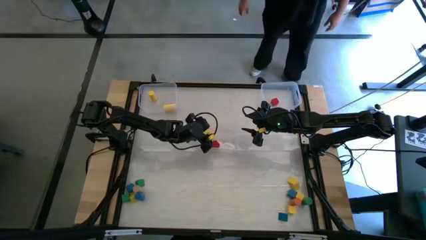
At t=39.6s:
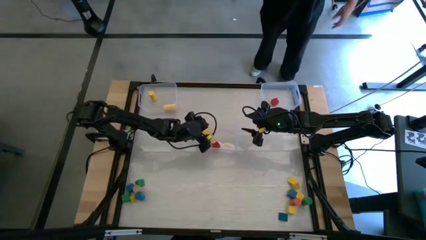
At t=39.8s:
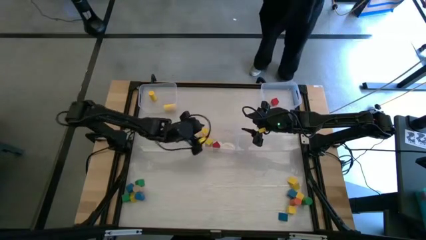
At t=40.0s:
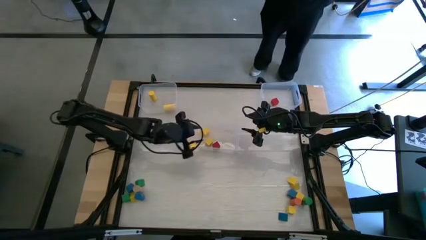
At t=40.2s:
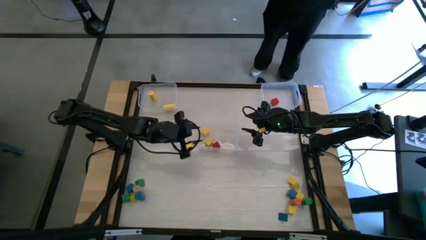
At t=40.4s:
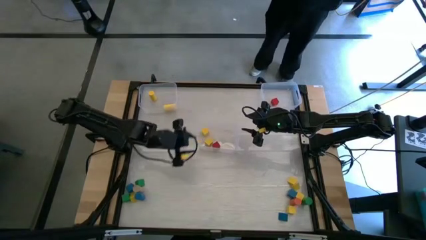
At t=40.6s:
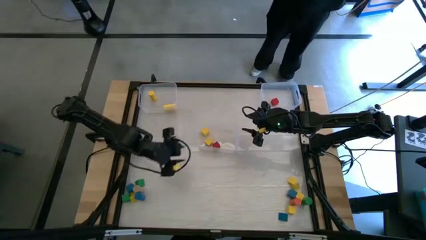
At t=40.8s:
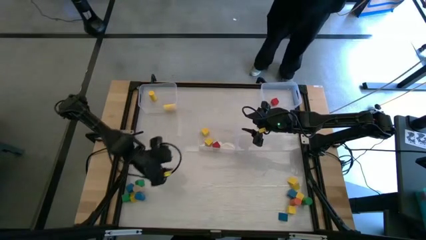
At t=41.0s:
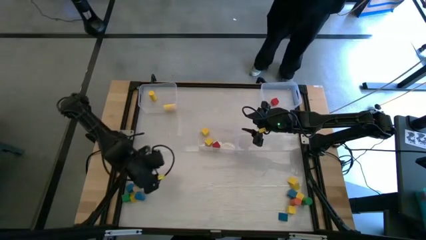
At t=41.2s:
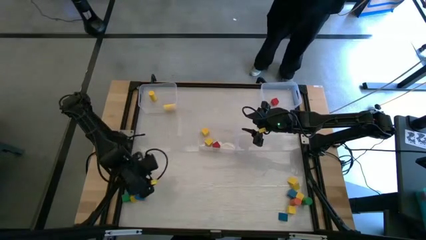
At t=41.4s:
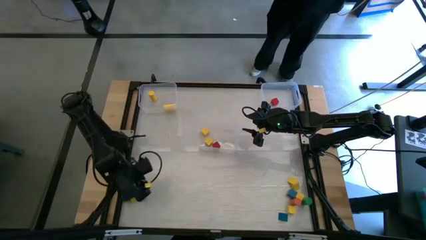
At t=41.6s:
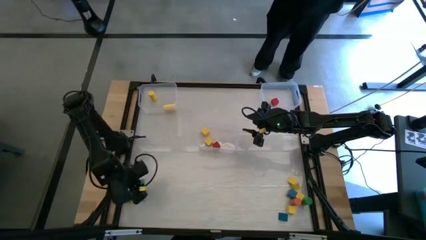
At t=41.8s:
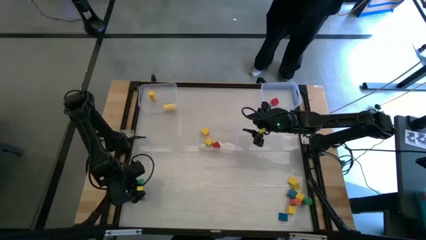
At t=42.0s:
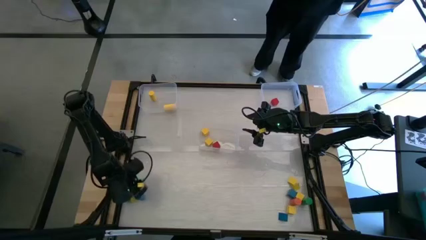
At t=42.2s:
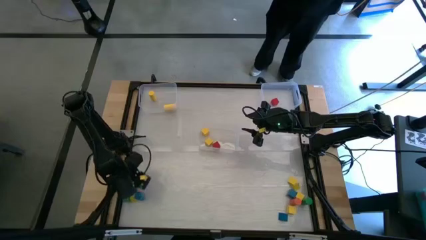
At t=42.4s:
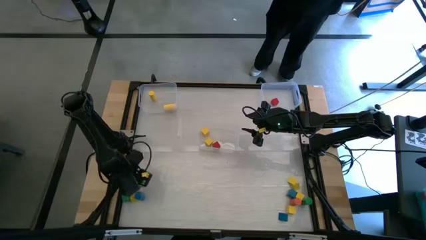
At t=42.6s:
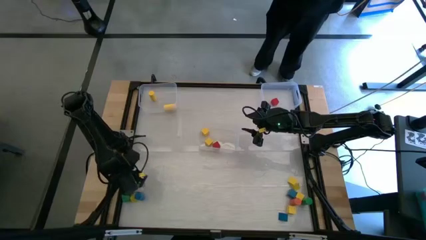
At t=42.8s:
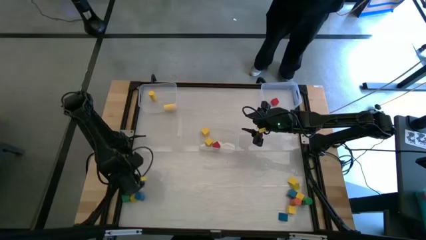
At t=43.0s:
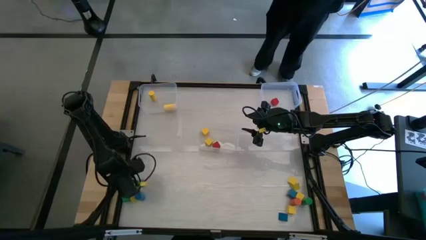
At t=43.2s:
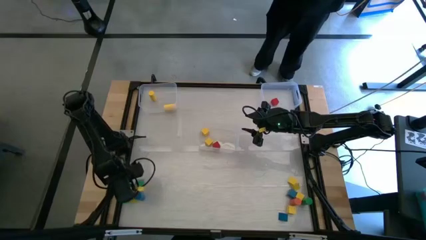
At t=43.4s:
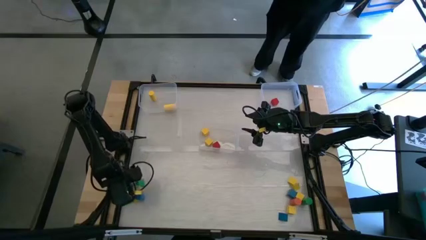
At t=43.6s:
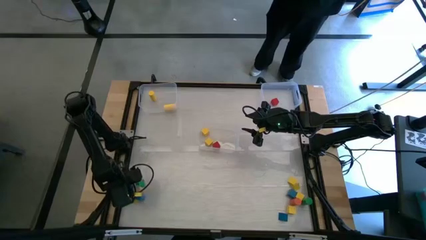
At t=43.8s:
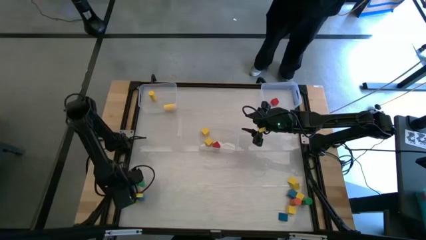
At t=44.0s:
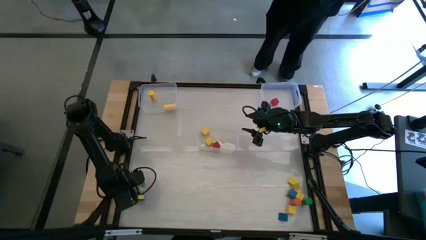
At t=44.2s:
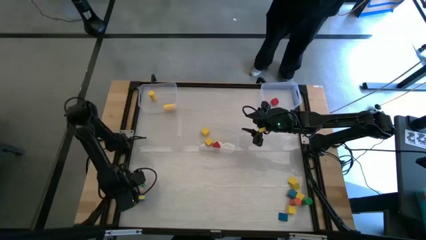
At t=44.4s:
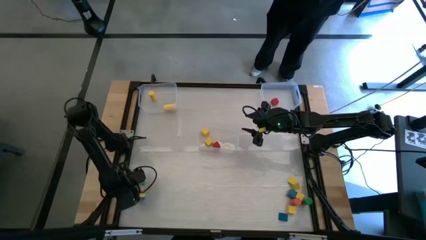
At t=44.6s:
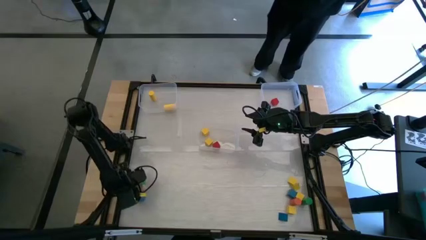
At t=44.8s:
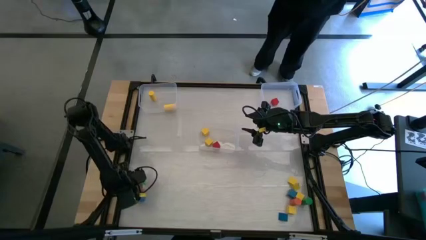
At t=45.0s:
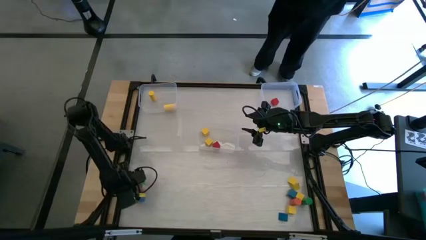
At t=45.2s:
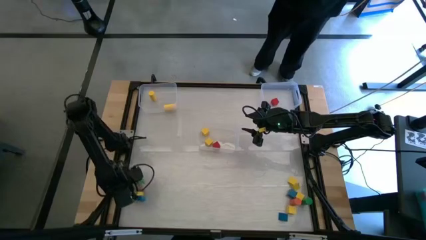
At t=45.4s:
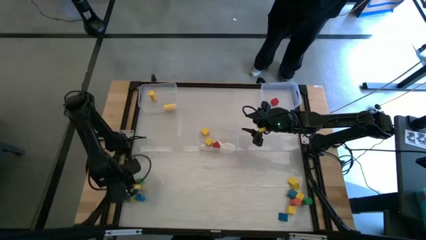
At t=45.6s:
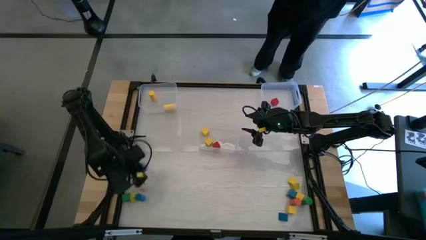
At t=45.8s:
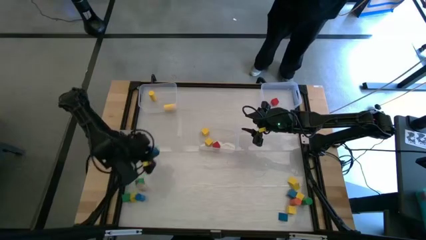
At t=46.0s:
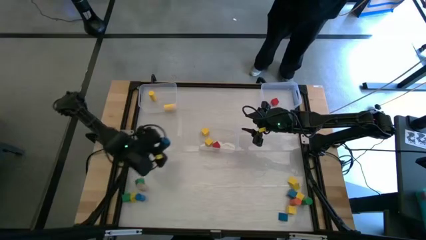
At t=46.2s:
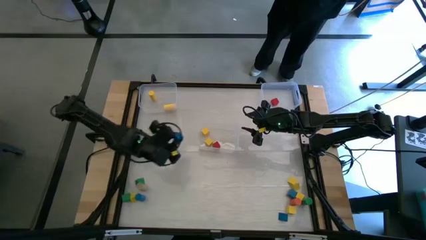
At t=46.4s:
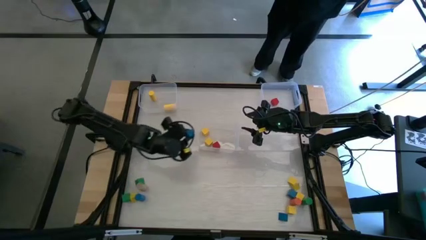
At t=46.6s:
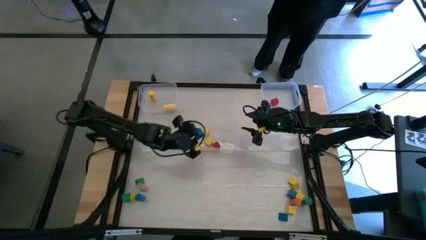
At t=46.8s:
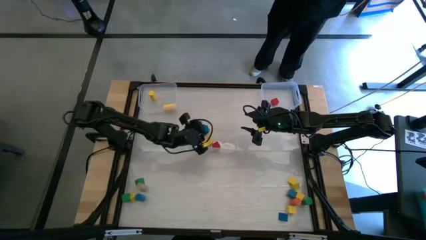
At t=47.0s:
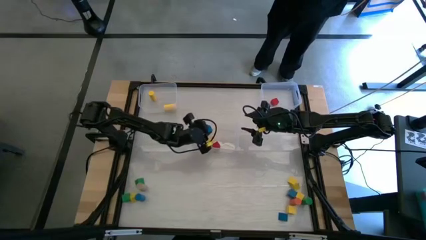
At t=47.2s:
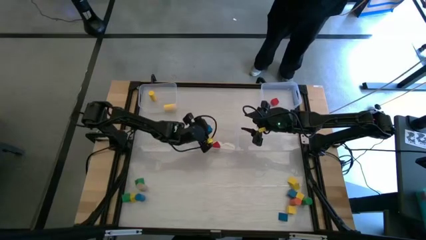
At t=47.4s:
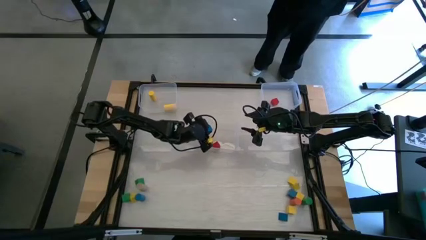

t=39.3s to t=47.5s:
Task: Sort blocks by size
Put the blue square block into the bottom transparent bin

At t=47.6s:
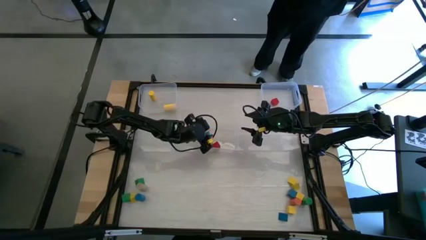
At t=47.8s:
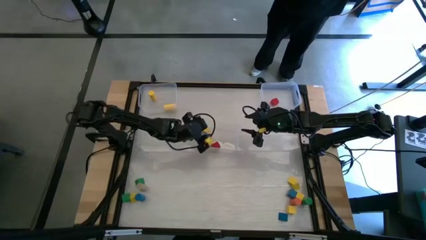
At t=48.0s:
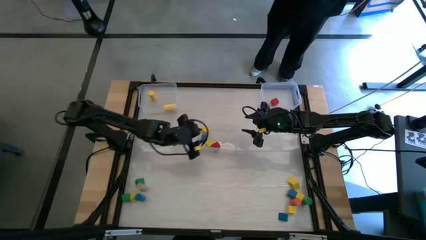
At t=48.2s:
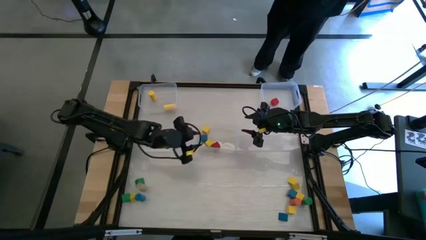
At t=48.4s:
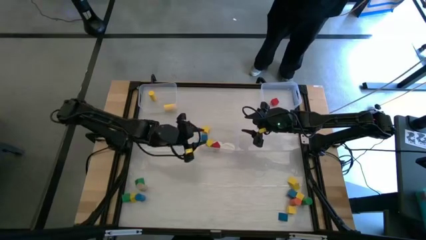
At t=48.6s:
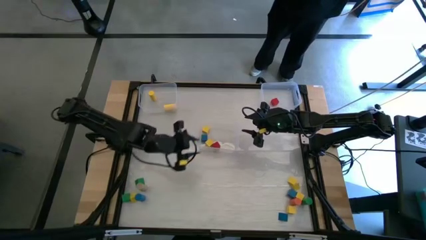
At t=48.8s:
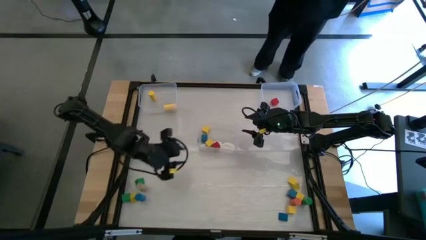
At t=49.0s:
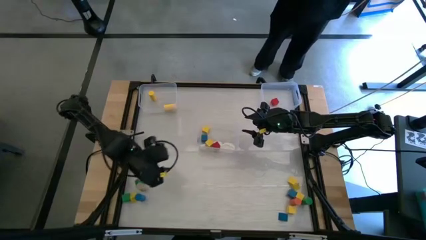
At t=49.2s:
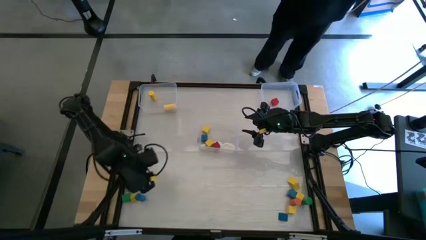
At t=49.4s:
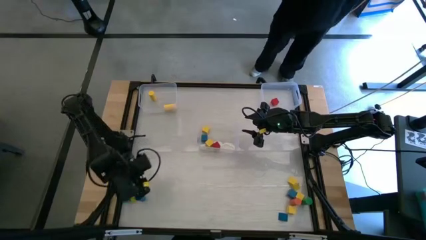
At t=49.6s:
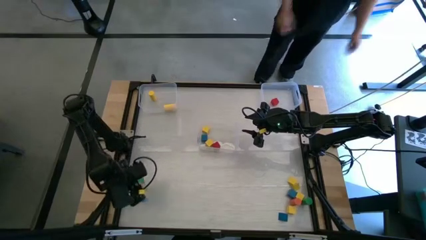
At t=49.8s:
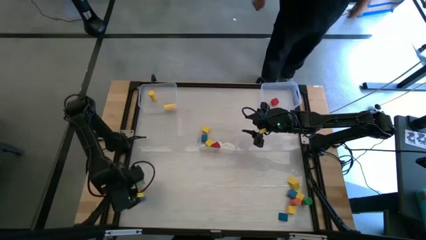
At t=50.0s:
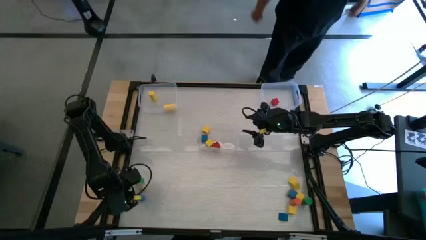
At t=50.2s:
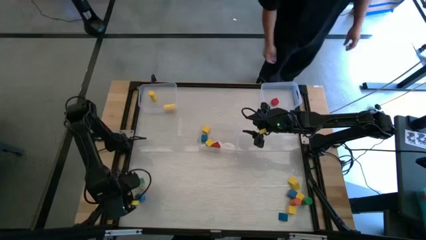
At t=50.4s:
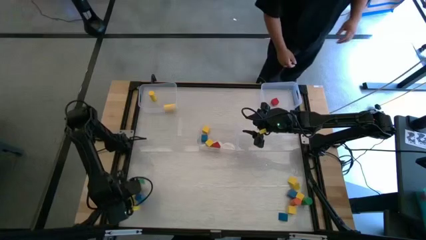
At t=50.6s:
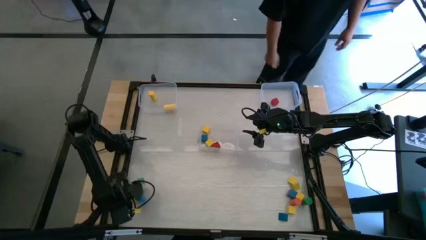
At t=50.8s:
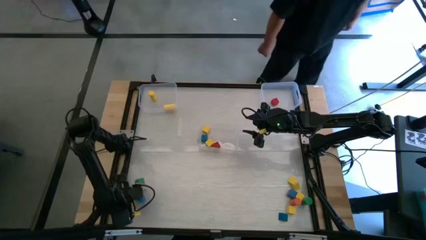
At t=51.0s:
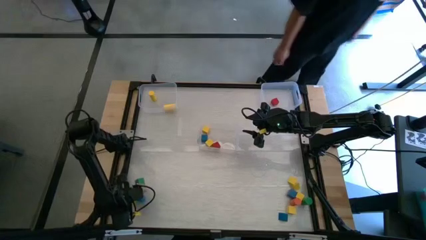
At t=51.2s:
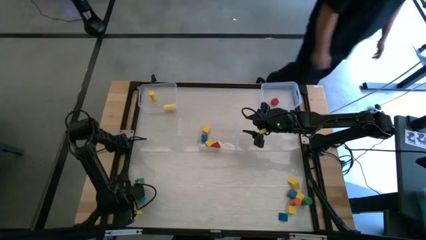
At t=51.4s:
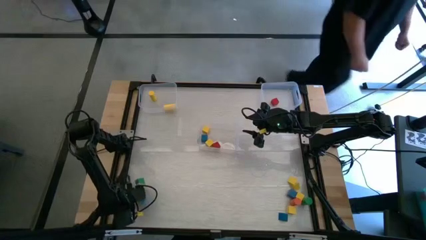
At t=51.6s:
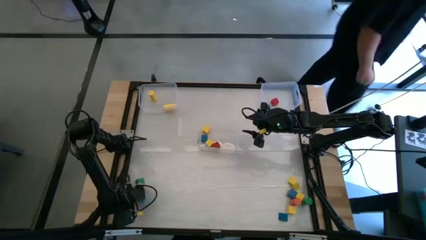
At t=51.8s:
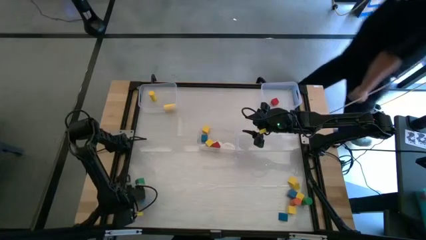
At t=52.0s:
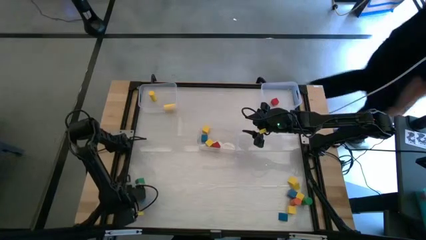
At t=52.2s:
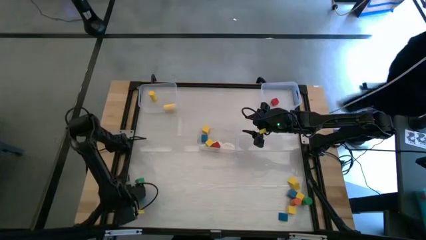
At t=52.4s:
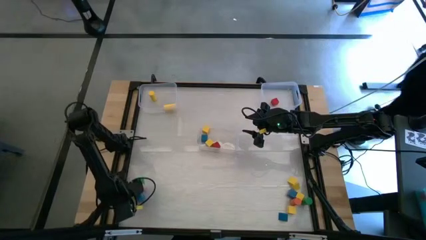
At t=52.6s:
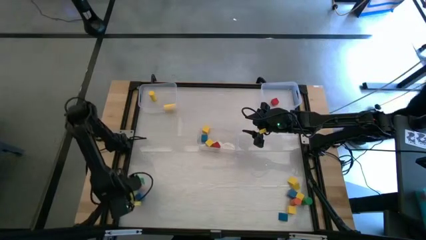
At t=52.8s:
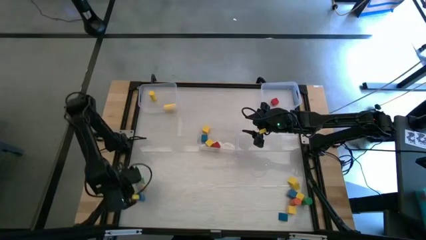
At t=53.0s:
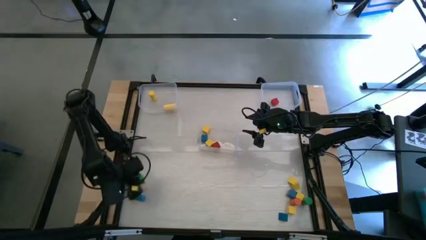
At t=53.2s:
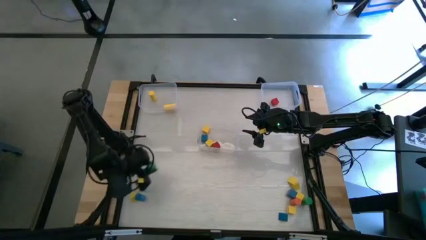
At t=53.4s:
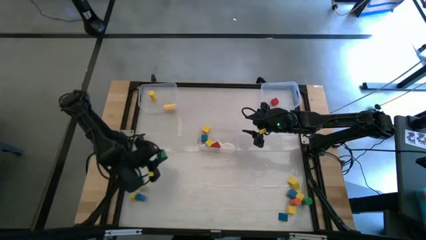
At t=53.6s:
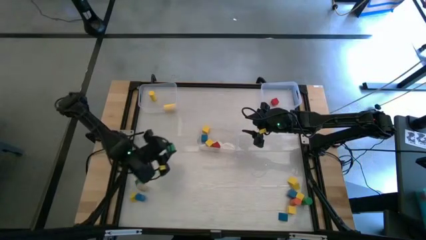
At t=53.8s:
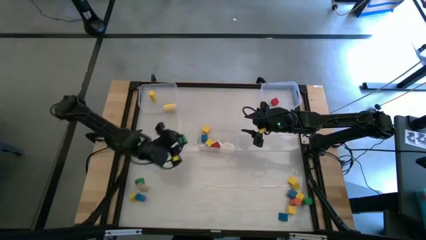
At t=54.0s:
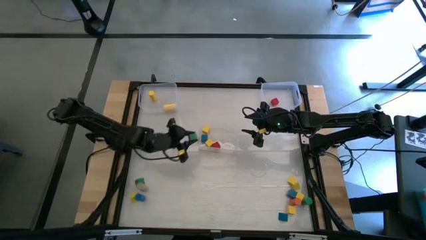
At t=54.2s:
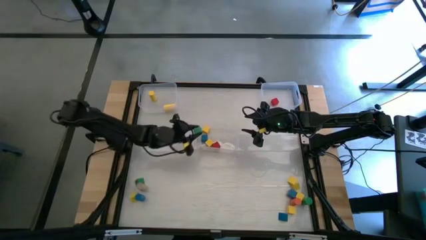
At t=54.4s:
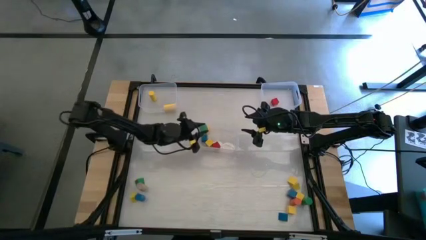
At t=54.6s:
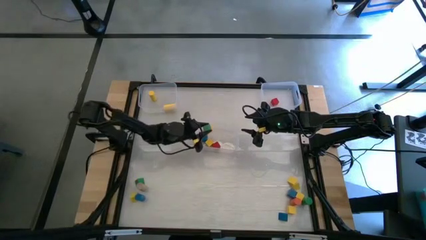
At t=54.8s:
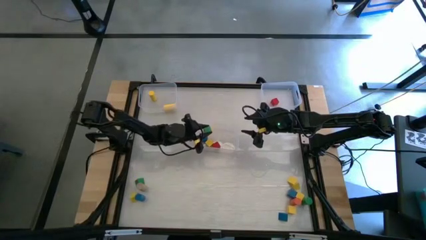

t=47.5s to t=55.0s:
Put the green square block into the bottom transparent bin

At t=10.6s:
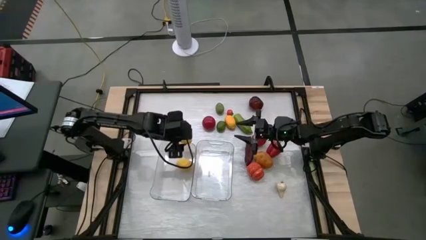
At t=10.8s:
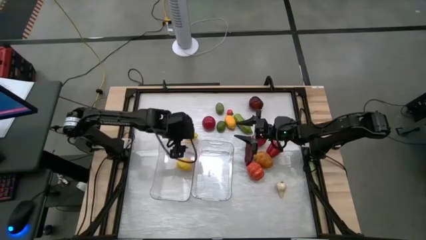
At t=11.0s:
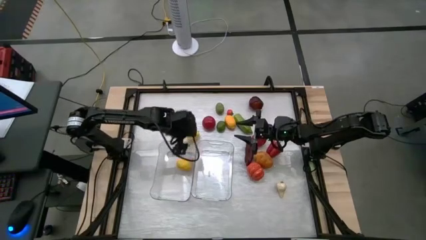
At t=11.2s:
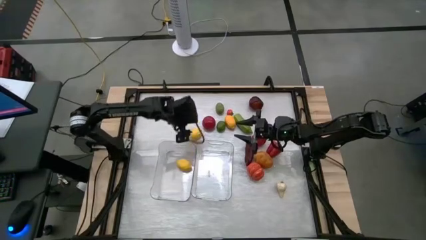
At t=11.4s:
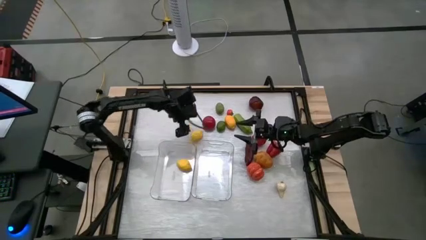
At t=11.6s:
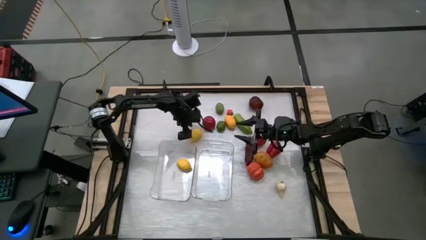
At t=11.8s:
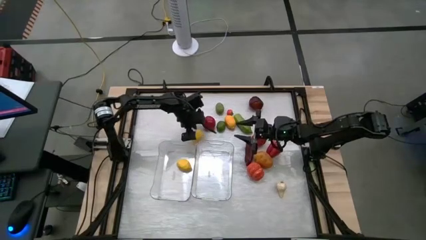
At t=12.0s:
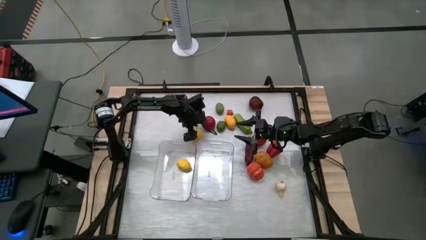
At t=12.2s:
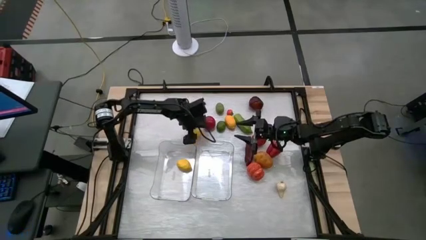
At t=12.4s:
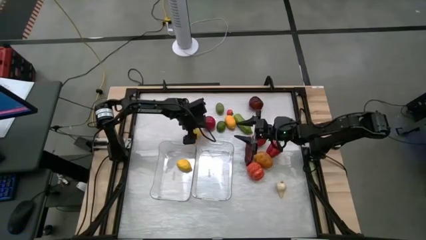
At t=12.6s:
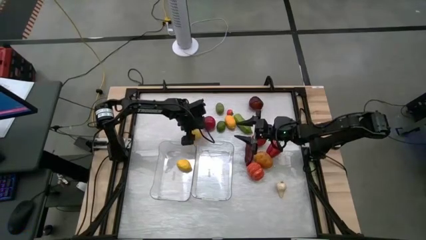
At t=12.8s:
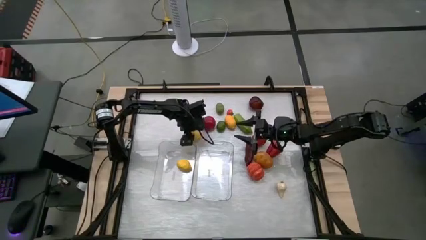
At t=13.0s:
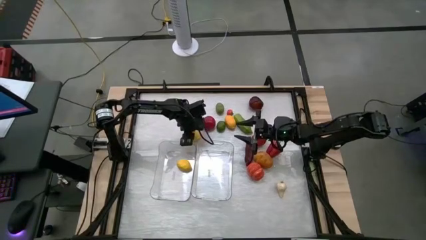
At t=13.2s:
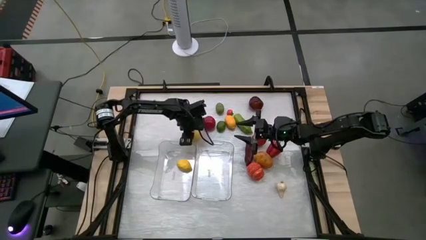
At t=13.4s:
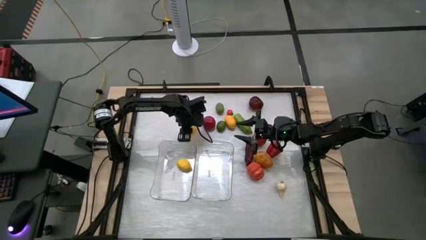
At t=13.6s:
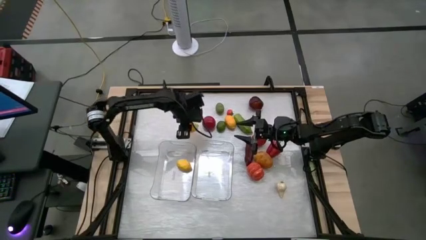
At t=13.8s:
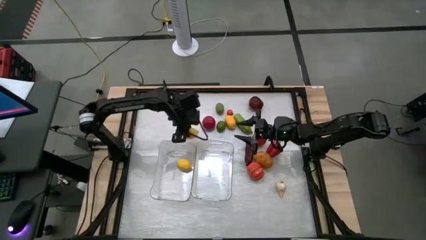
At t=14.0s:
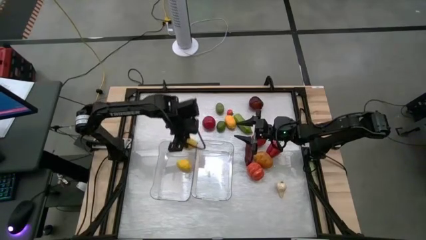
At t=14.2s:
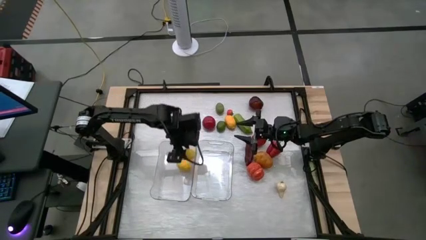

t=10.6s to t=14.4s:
Task: Sort produce into baskets
Put the lemon into the left transparent bin
